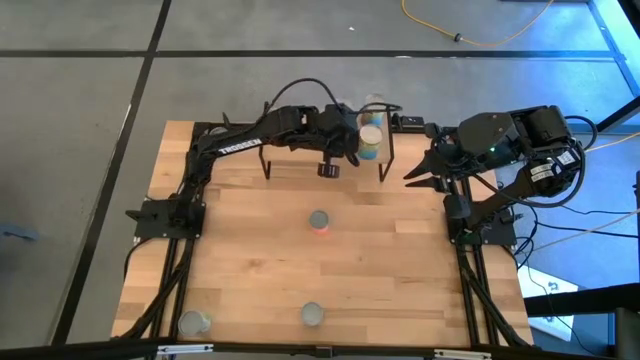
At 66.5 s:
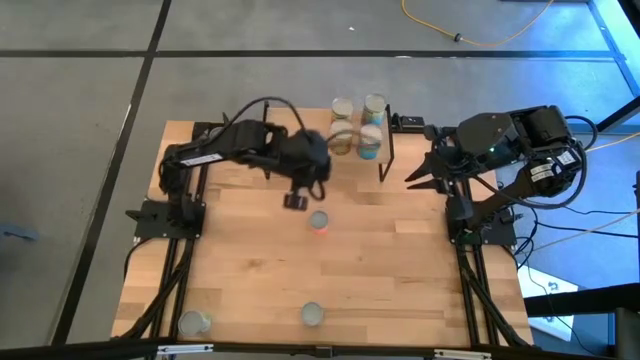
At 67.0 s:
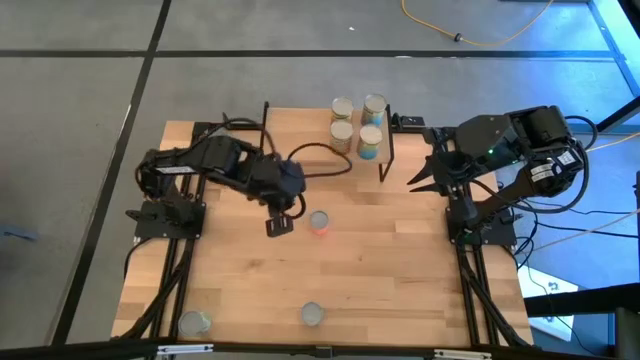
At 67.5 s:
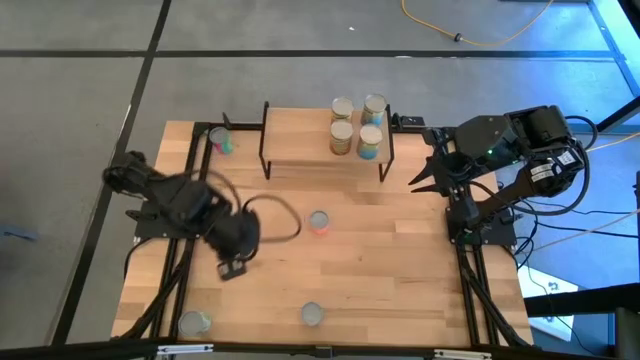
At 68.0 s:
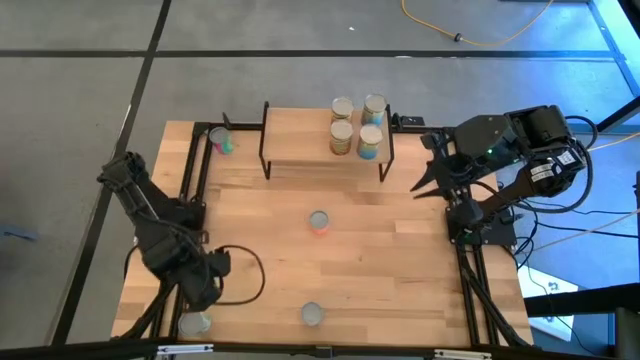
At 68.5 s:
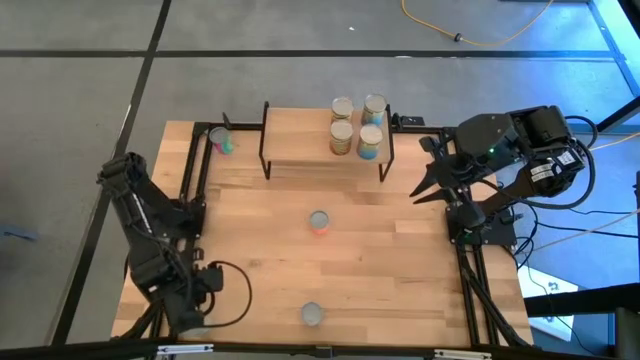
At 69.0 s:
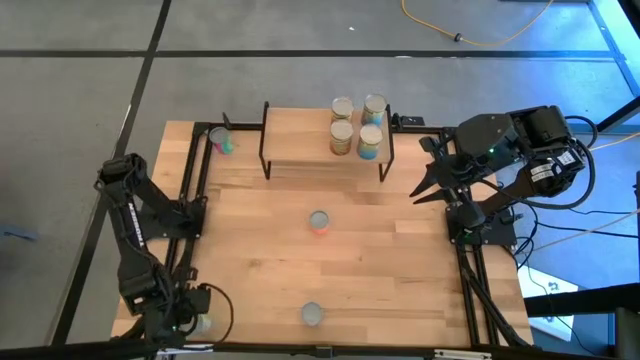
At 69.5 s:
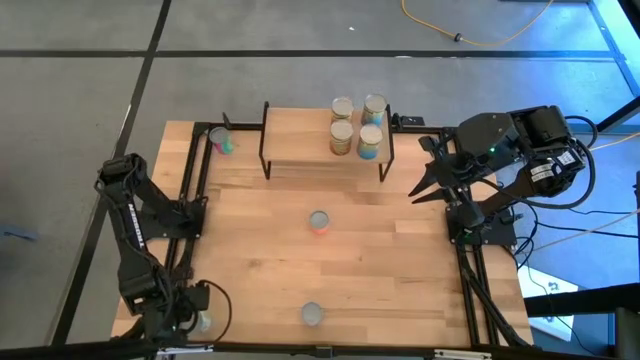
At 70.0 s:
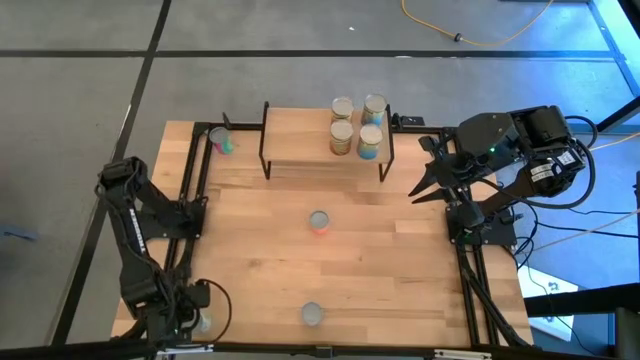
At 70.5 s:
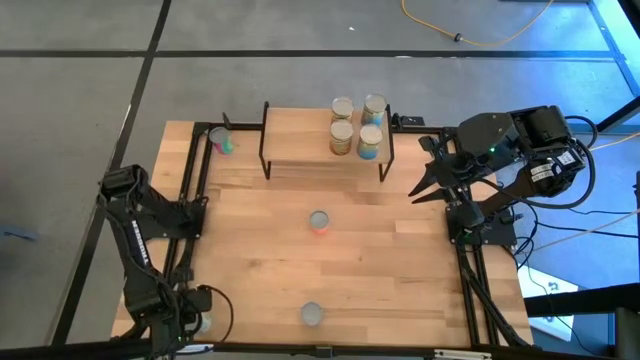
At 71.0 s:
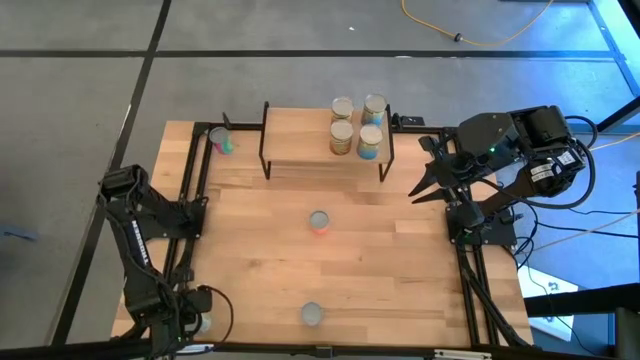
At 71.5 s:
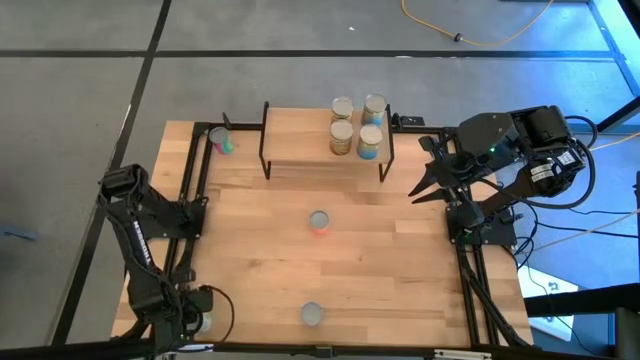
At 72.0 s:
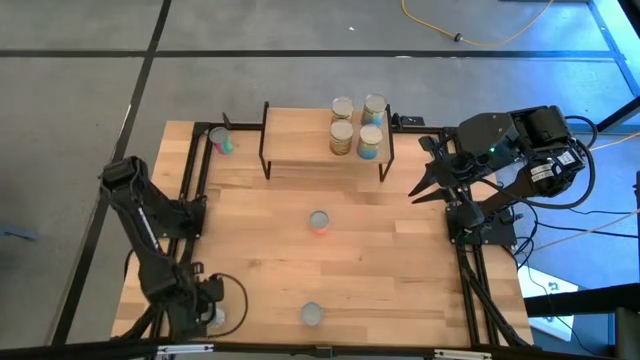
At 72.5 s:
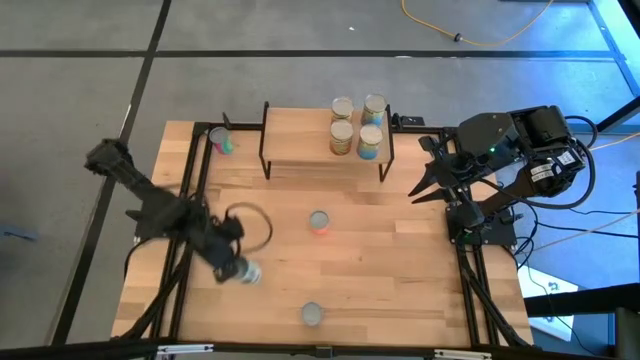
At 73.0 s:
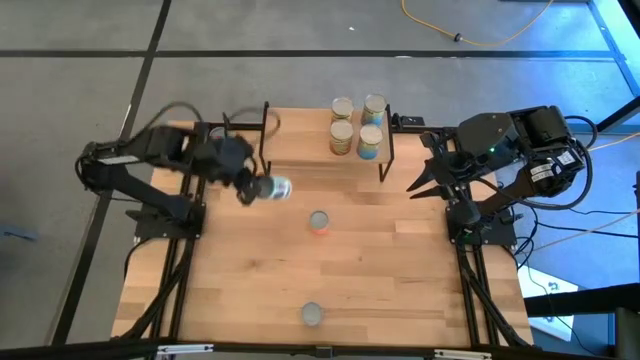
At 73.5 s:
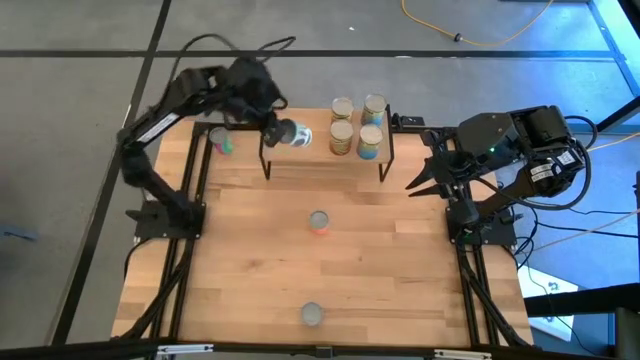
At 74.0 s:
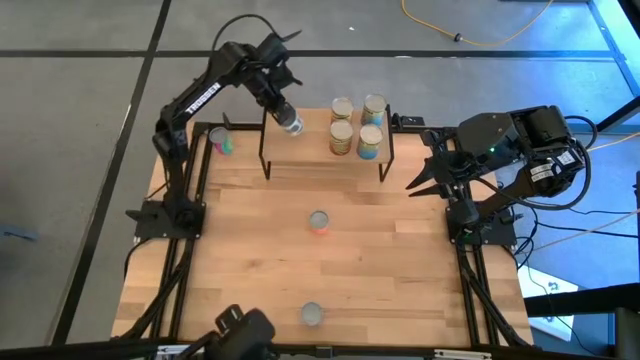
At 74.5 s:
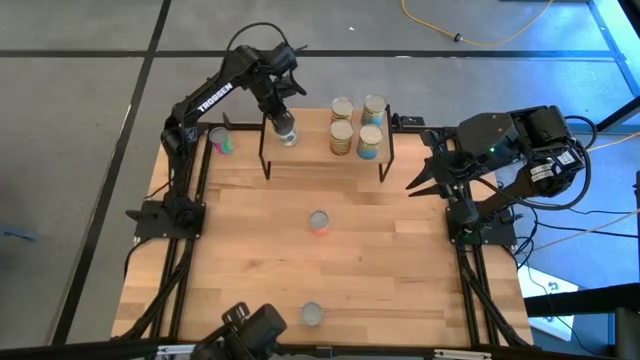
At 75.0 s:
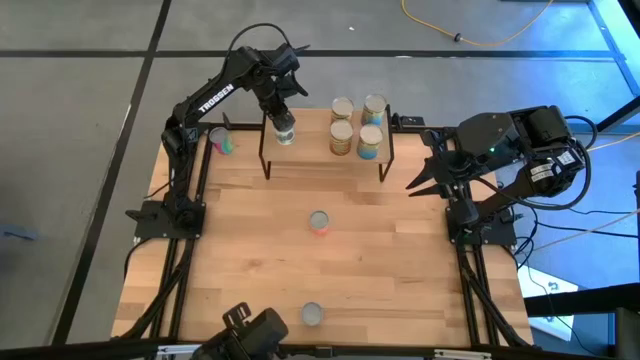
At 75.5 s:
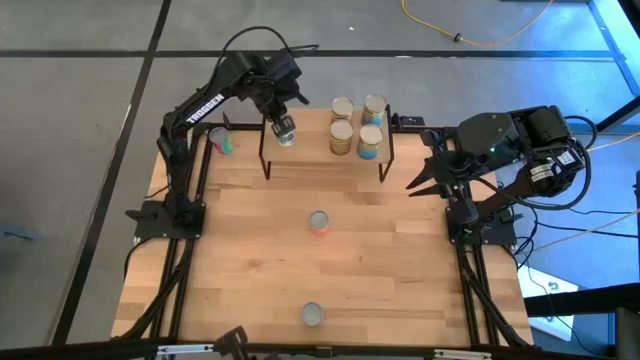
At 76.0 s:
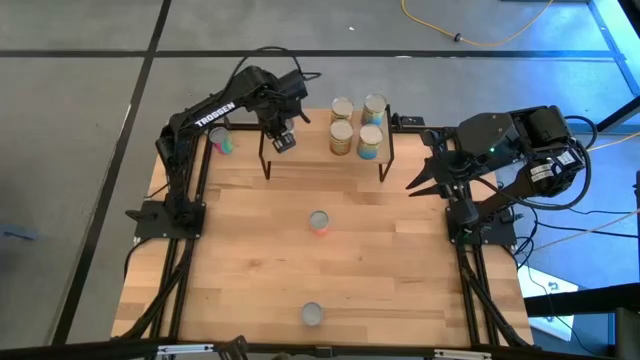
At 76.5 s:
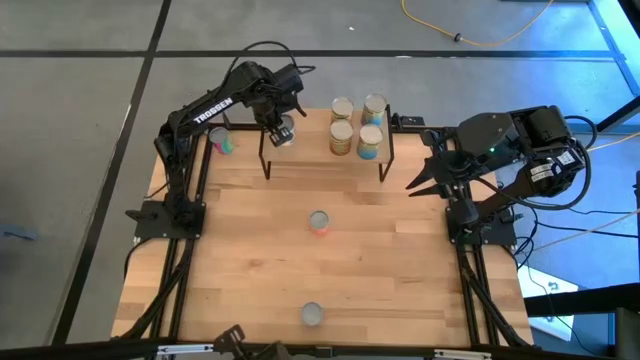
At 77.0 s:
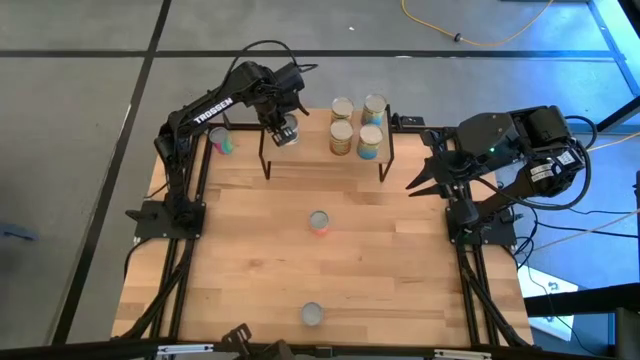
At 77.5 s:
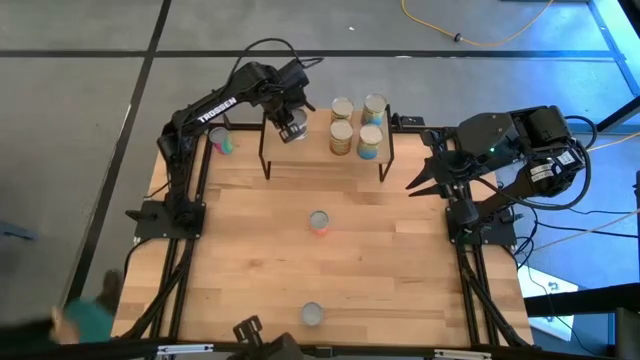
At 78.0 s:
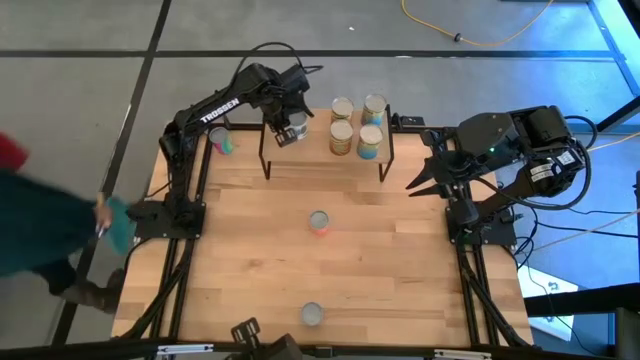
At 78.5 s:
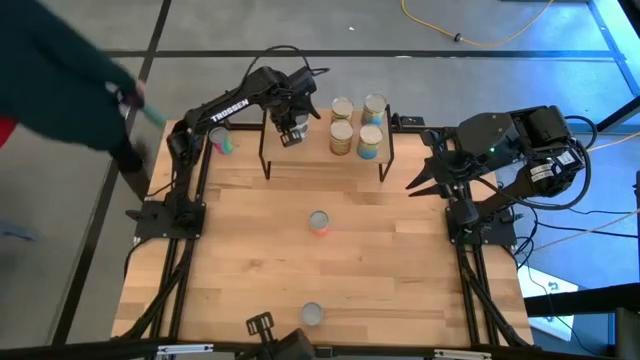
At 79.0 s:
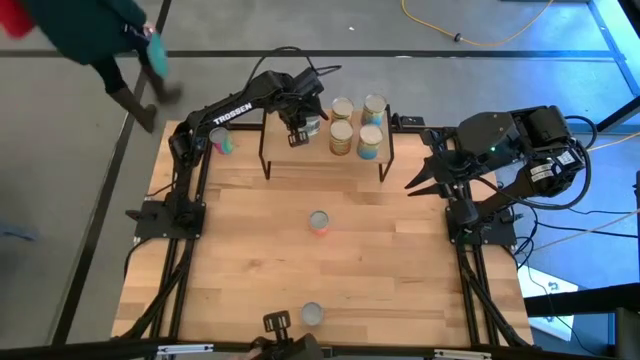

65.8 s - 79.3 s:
Task: Pick and place cans onto a shelf
Put the canned vegetables mixed on the shelf

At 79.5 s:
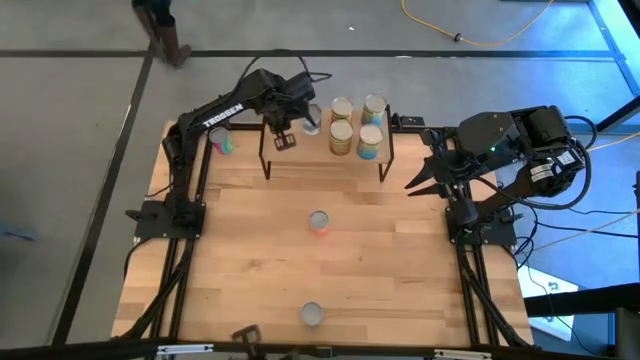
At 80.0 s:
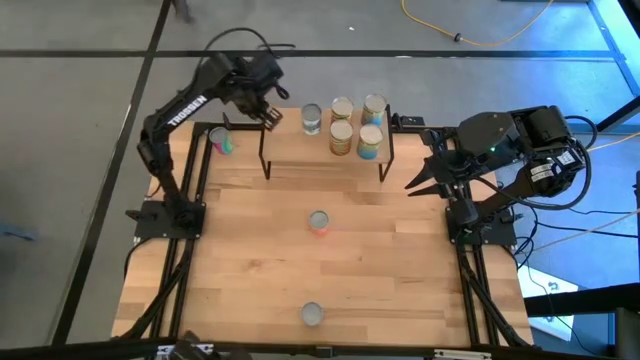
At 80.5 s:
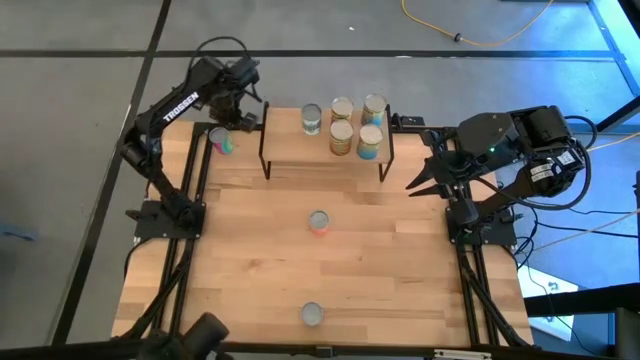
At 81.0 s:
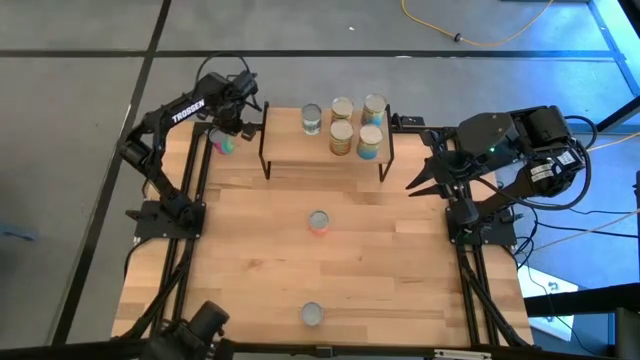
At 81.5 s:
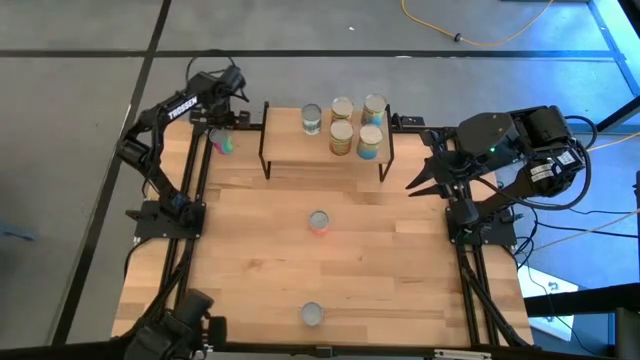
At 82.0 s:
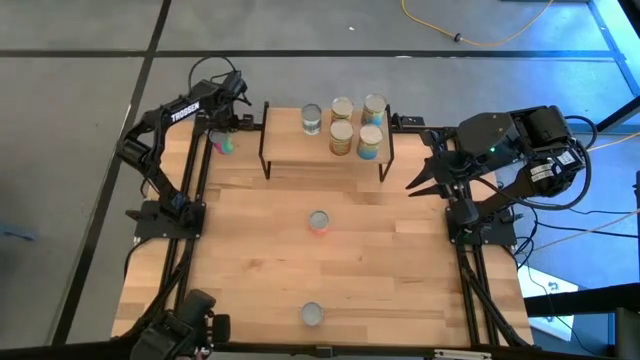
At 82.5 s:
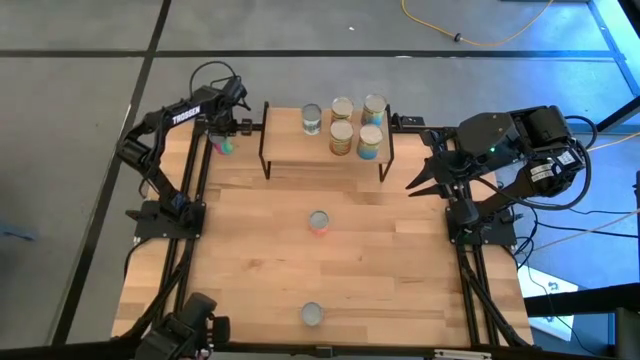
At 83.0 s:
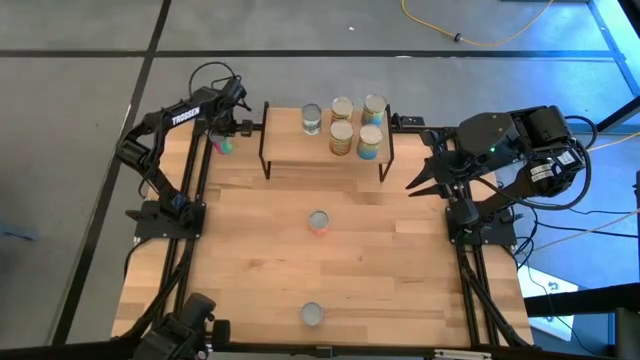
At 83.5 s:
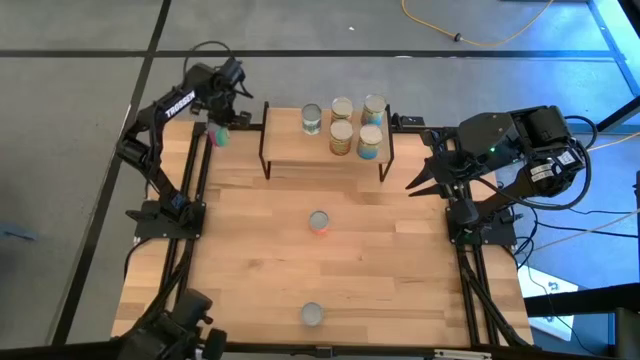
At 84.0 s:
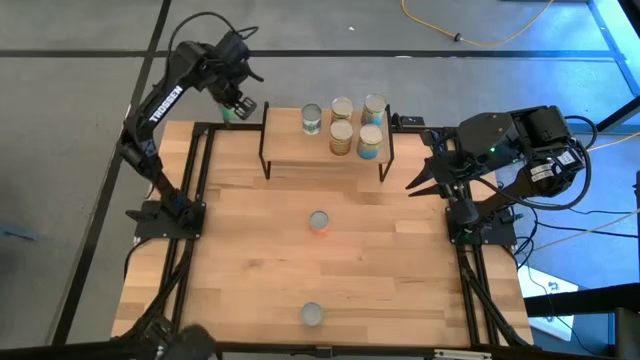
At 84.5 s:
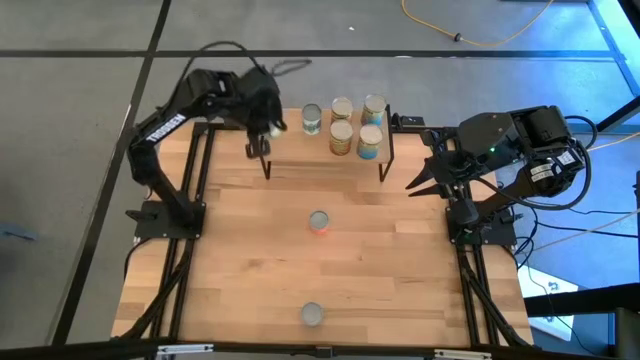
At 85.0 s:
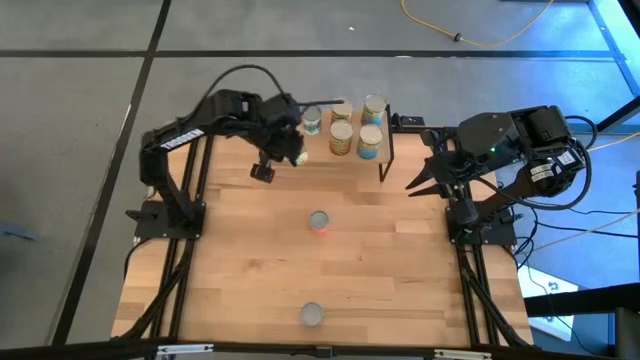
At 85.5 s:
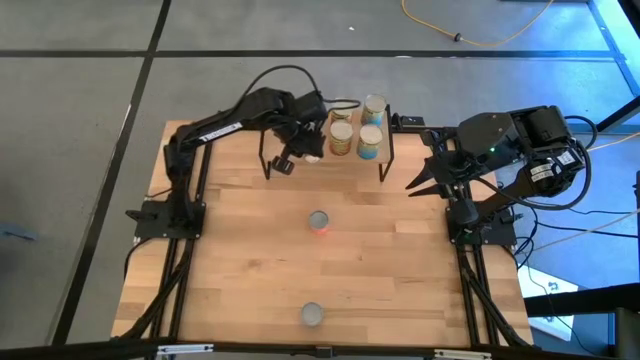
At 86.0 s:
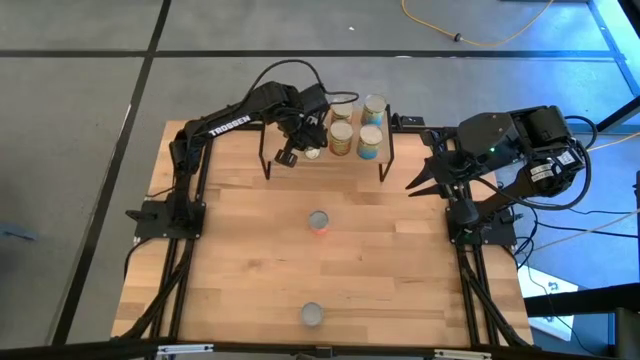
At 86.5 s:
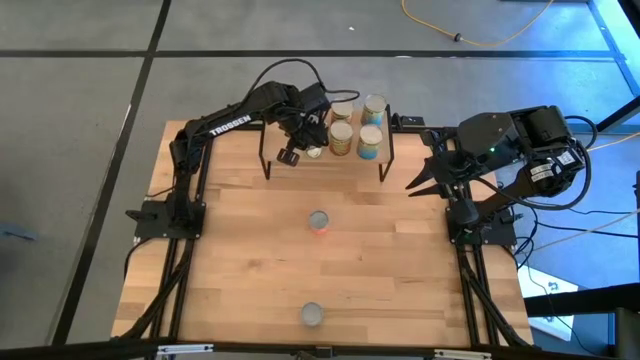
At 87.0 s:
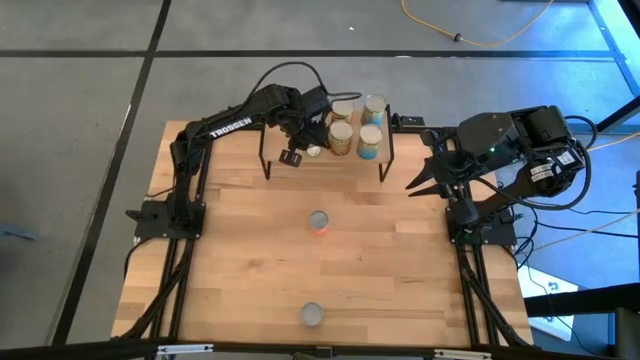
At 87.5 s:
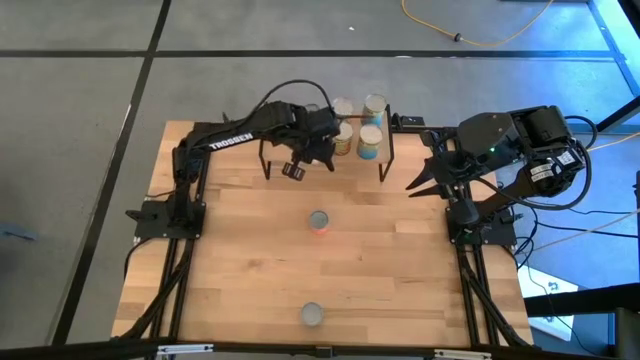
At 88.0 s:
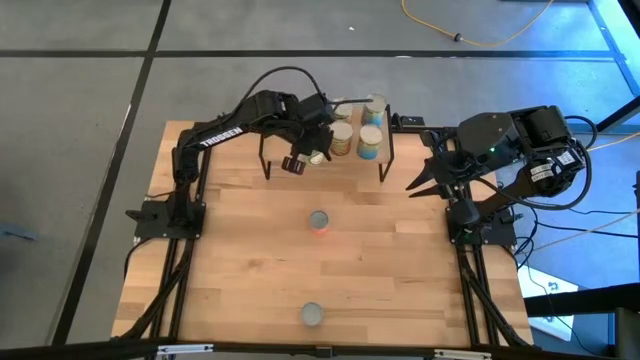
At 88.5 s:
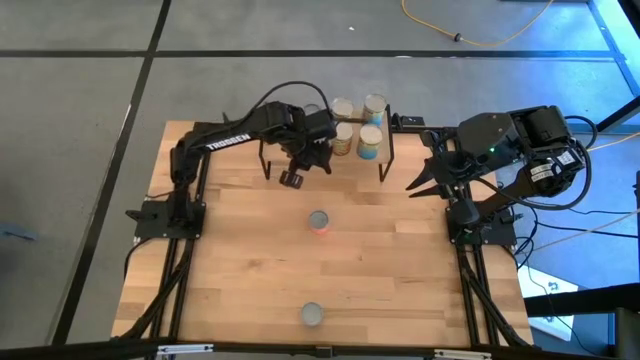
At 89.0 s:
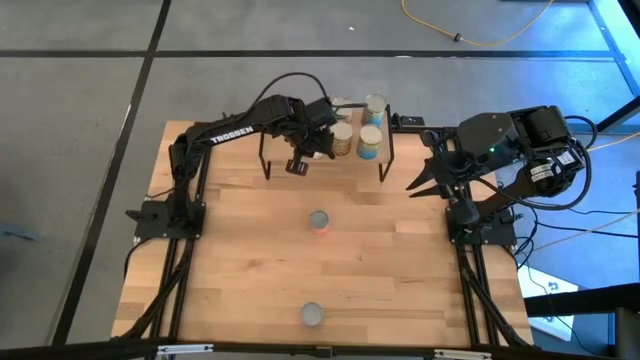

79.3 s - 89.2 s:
Put the canned chicken soup on the shelf
